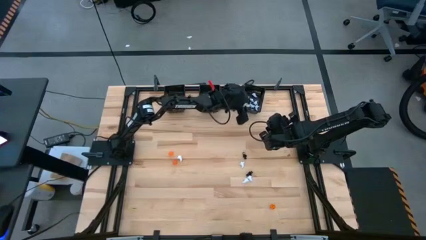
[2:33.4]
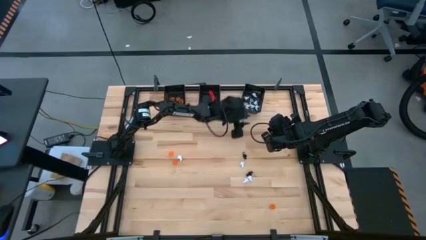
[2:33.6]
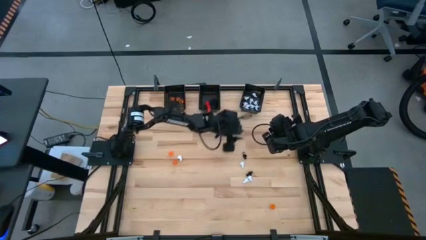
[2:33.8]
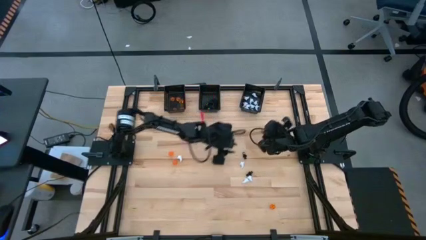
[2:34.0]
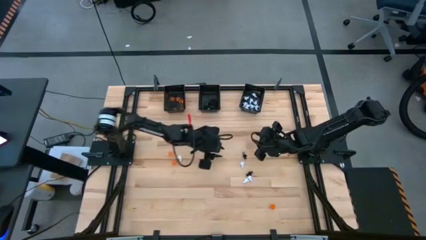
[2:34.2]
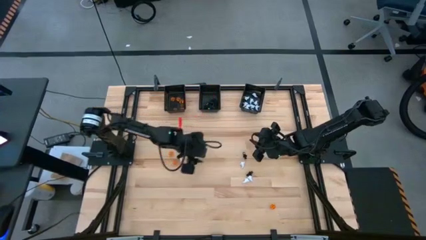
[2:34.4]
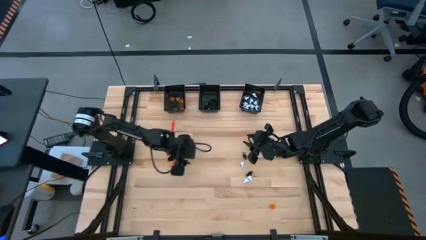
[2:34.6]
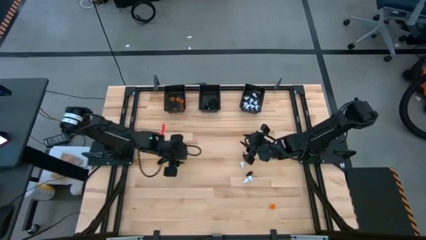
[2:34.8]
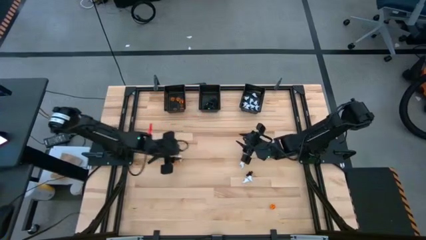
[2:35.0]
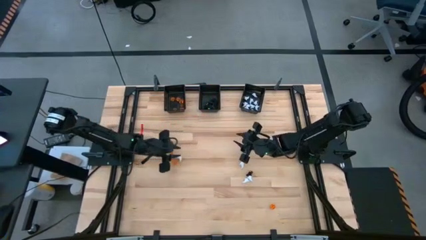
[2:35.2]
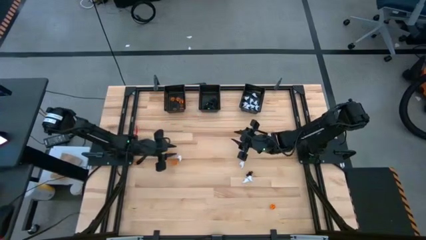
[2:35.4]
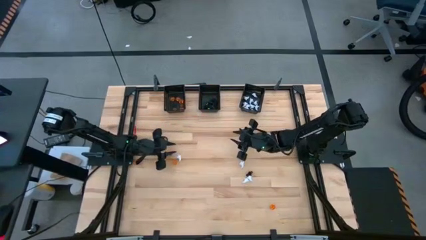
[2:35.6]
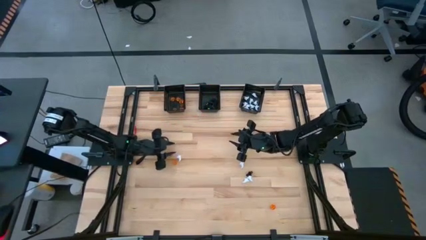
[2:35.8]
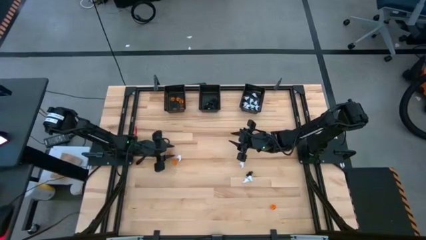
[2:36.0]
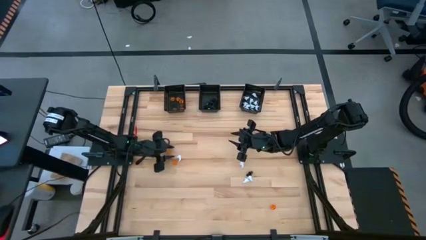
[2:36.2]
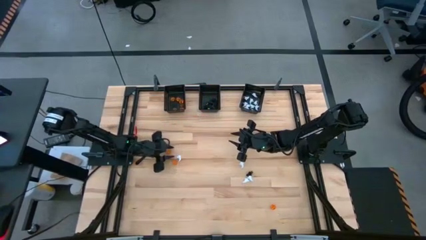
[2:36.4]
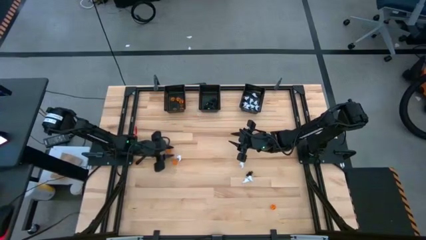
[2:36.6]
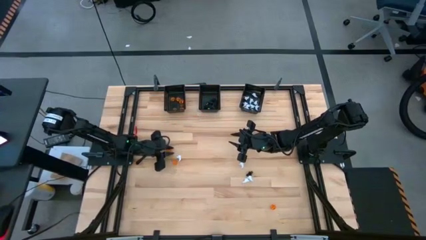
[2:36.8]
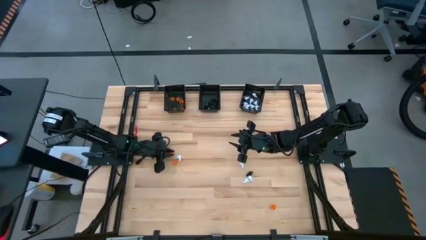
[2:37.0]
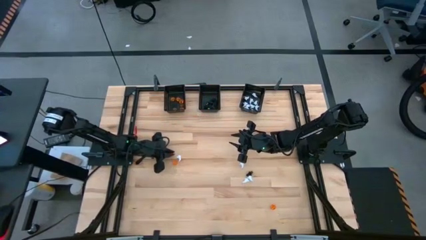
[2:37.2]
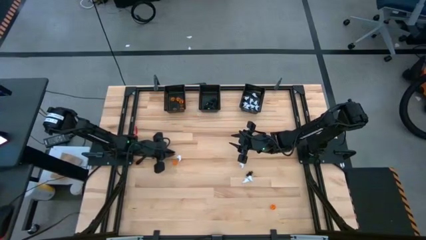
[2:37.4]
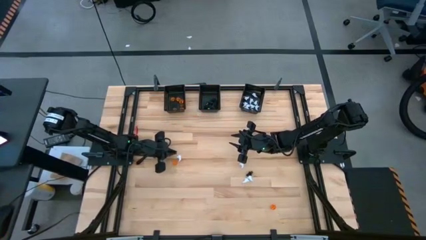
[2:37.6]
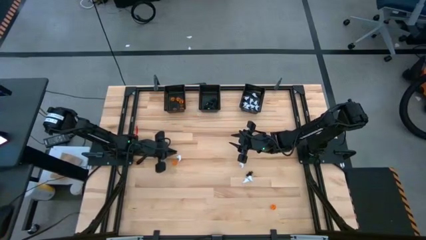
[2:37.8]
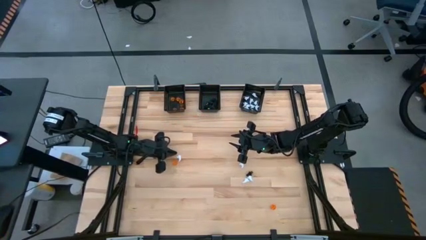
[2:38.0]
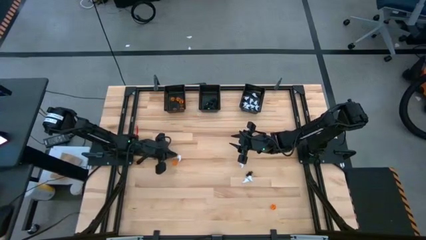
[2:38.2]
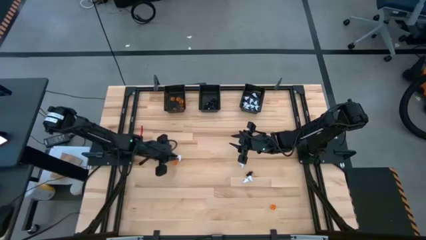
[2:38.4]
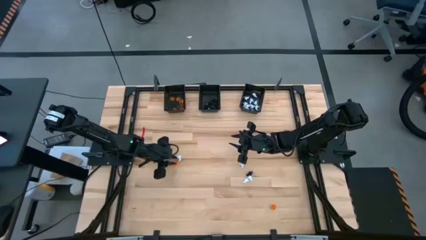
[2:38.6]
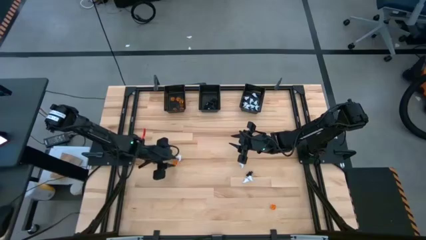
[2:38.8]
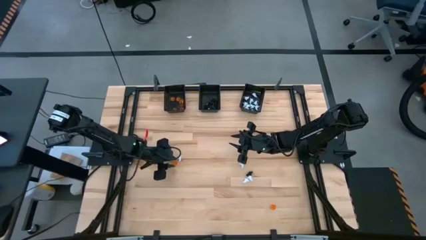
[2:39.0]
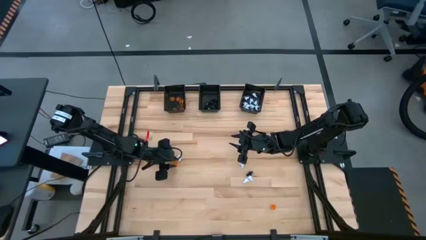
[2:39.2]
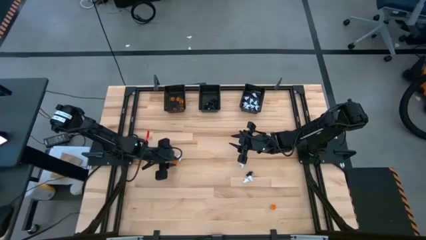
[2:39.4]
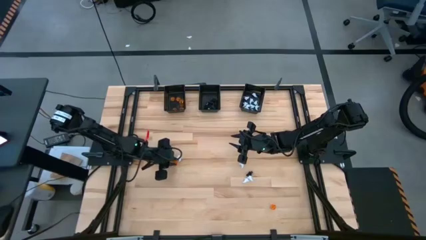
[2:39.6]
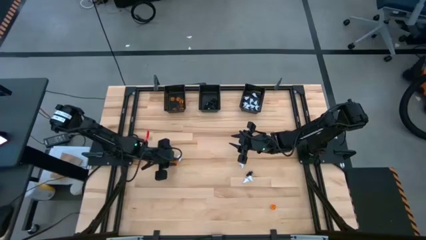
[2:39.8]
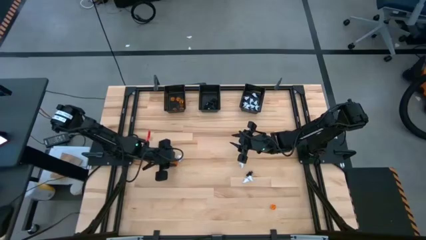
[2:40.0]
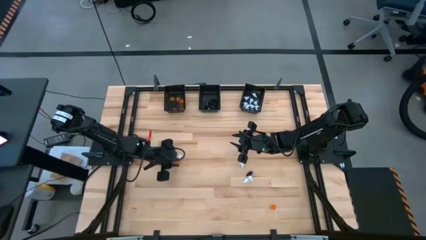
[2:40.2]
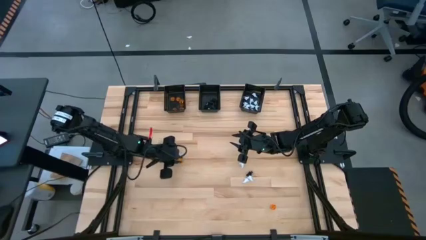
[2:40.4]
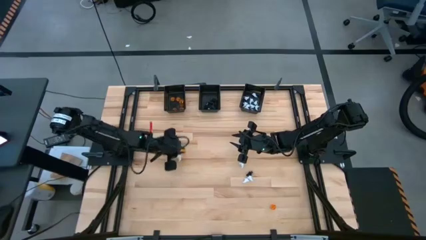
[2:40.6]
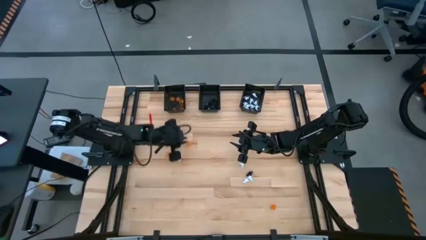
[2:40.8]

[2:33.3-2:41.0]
Task: Sort Halloween decoration
Put the orange pumpkin toy into the left black basket

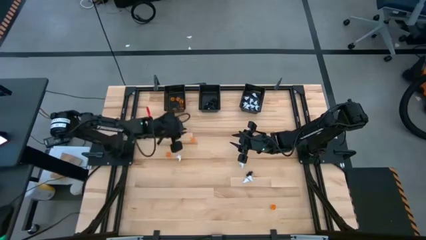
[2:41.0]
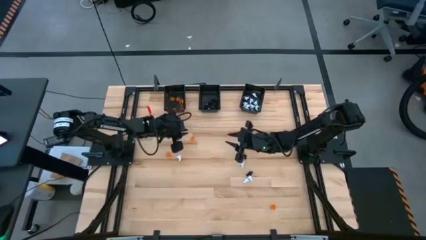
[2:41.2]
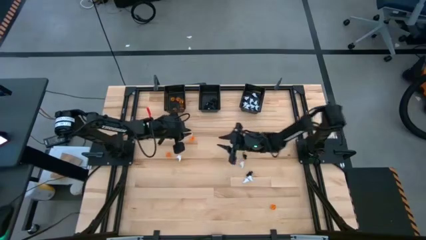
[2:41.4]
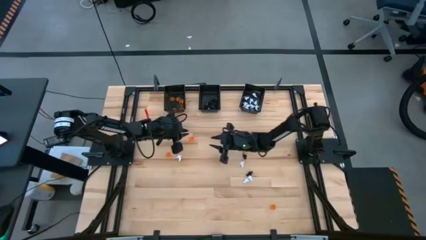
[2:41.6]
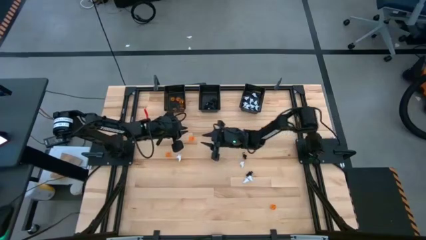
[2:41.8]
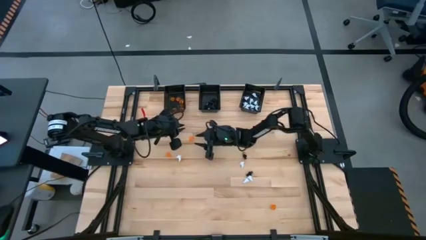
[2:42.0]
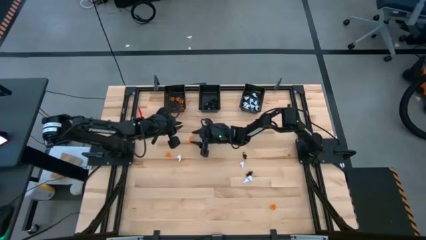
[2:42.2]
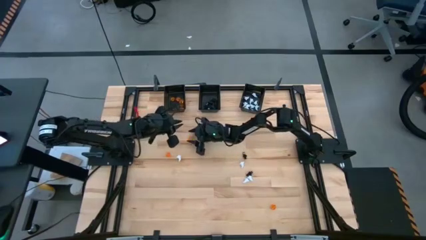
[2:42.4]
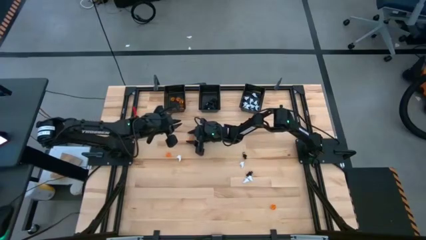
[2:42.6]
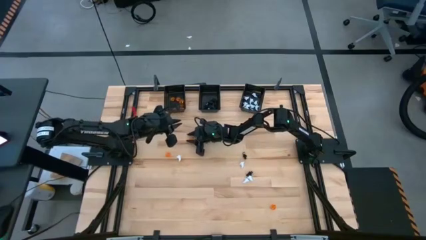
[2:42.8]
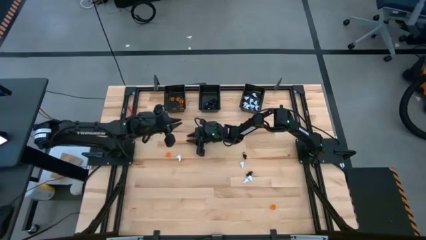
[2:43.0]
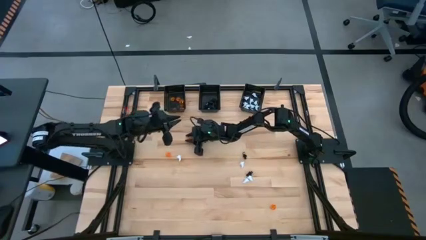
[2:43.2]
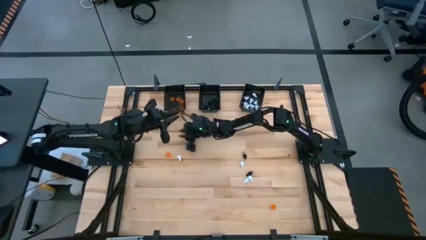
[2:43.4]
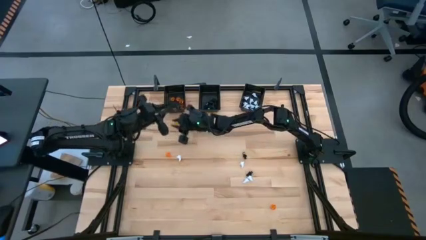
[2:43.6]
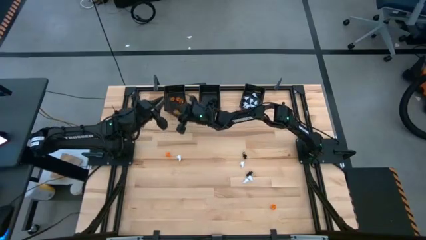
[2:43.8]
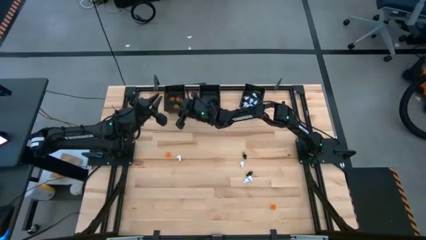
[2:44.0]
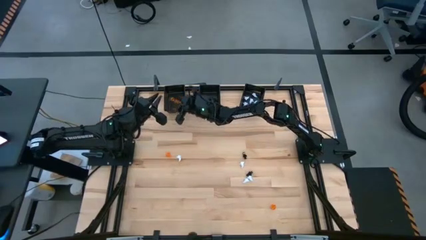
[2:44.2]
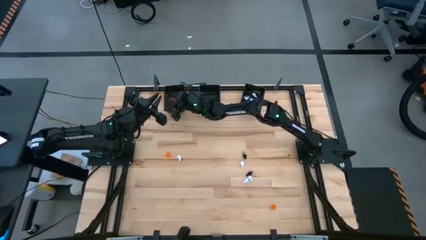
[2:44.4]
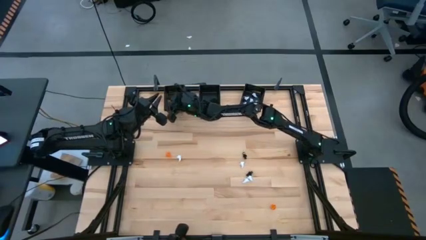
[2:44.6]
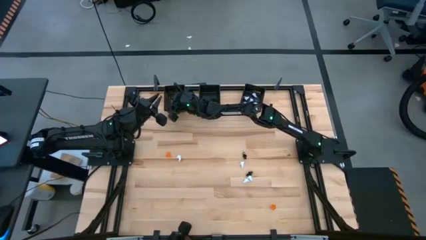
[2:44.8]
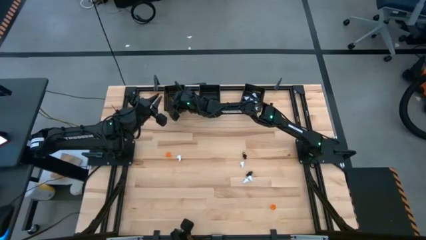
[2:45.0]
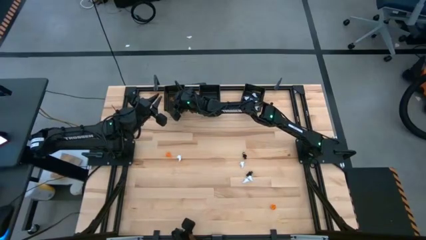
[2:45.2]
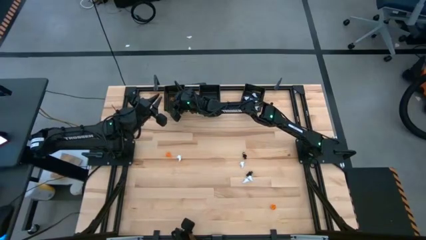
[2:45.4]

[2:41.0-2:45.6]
Put the orange pumpkin toy into the left black basket

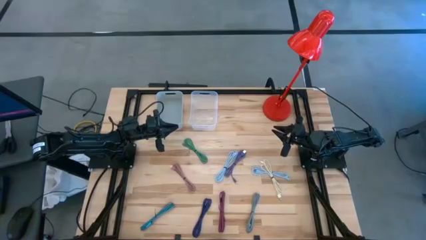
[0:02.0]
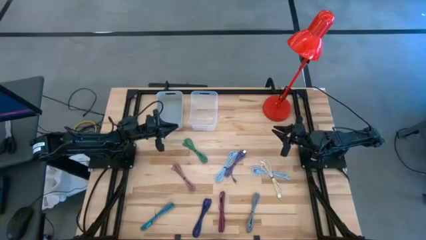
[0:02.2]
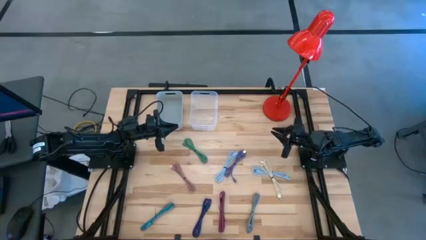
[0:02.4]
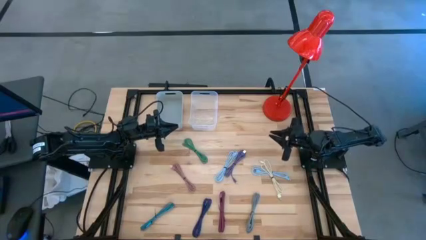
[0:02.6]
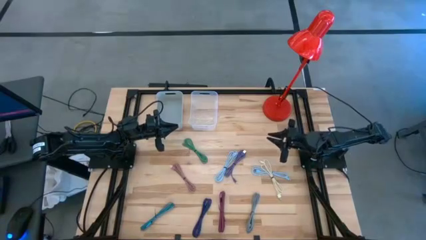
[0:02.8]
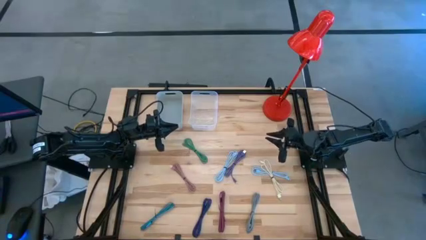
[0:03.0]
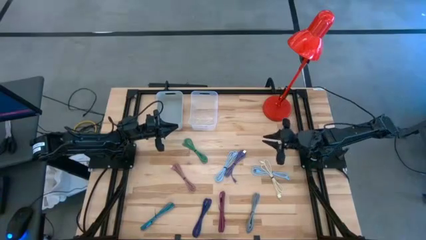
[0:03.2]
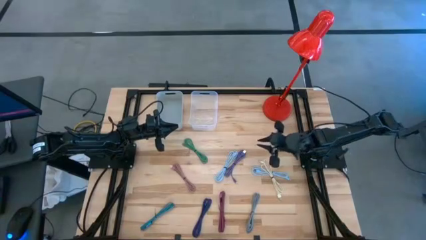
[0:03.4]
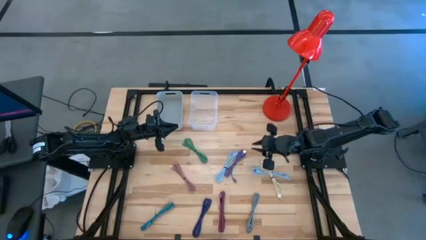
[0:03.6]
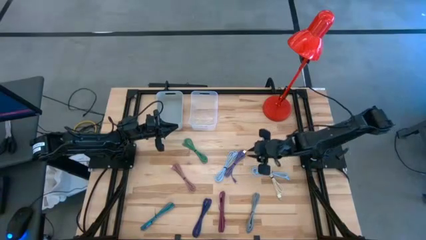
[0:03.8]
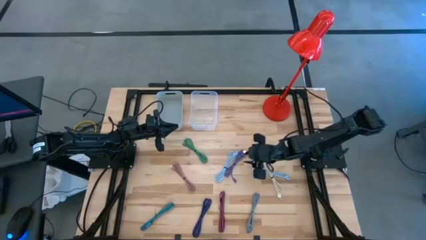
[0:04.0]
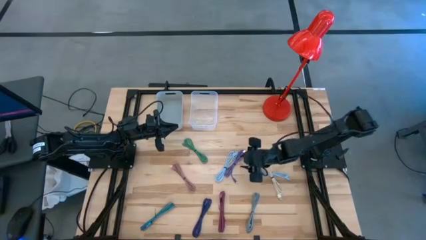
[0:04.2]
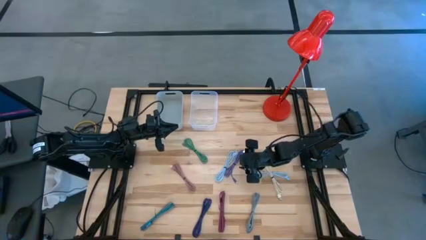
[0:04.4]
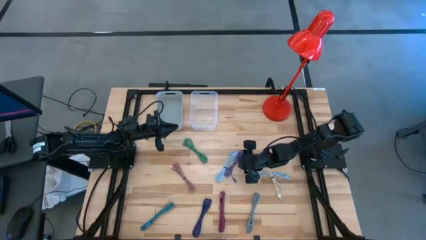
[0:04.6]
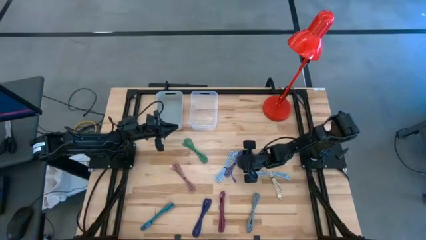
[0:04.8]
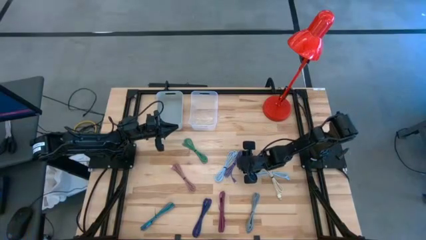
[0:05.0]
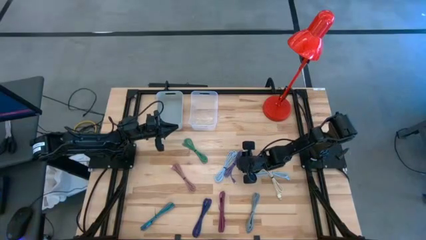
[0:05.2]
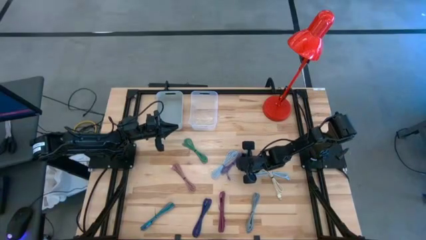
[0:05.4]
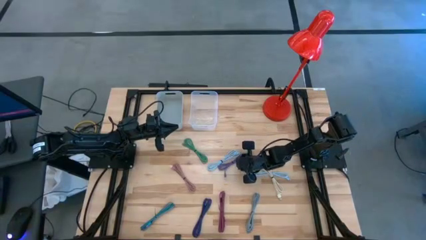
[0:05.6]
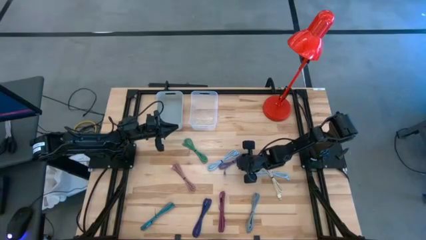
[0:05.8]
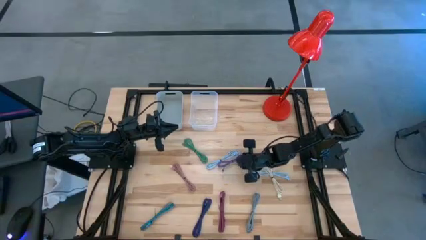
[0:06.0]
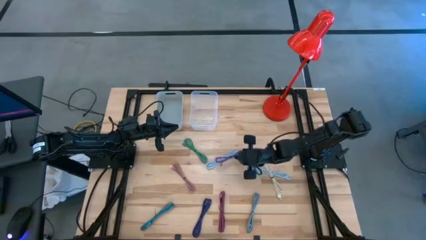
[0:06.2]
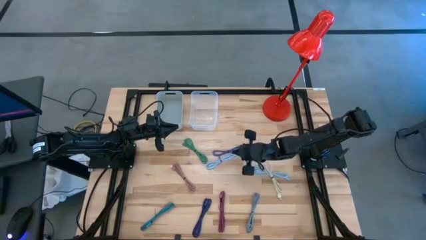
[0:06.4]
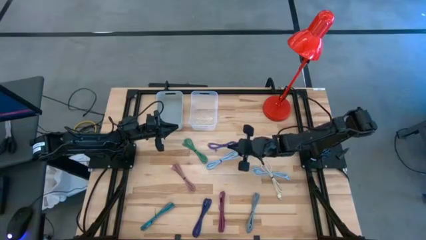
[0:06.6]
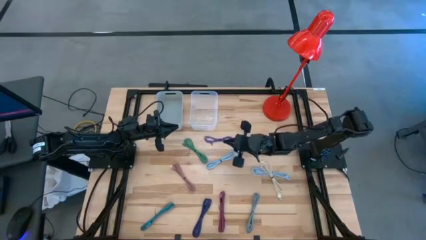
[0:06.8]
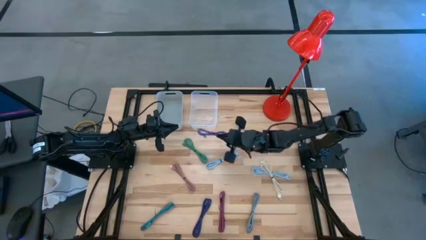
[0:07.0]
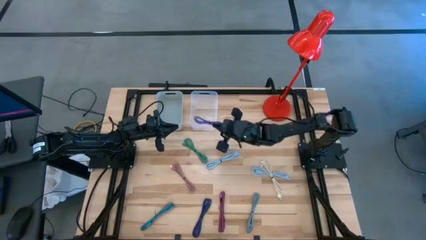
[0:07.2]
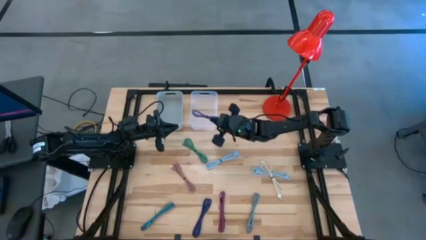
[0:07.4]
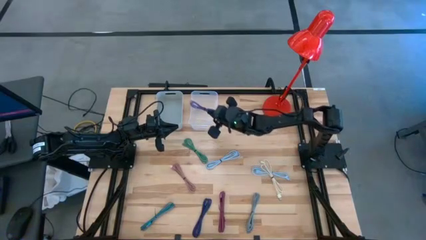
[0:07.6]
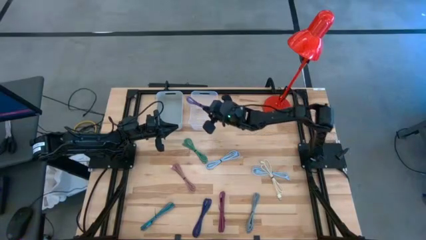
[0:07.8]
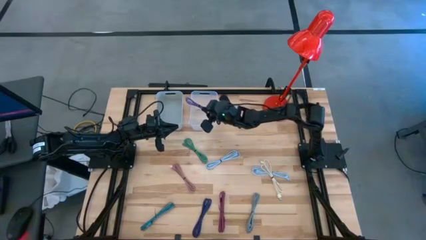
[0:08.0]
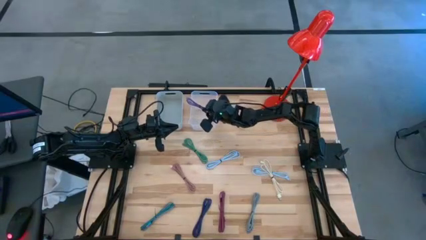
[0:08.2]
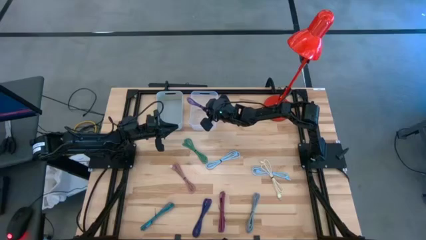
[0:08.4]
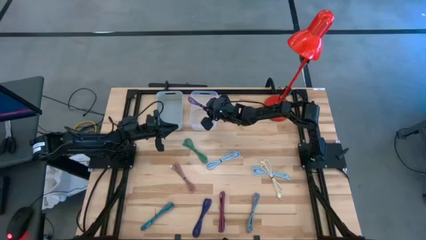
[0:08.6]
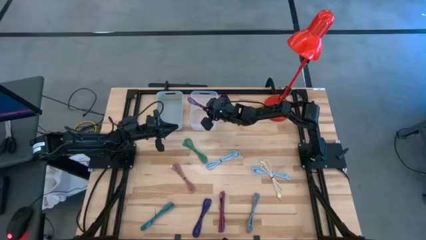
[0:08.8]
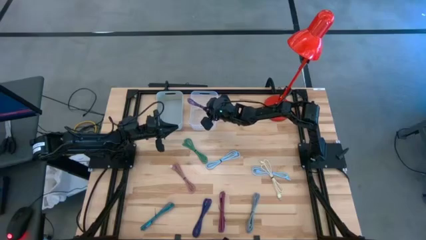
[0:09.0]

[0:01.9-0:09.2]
Task: Pick & Place USB Port
Put the purple charge cable into the transparent bin
